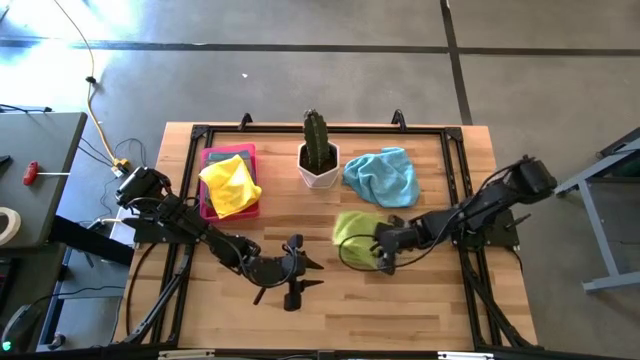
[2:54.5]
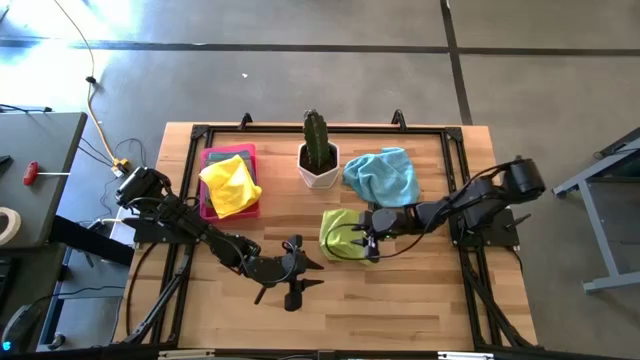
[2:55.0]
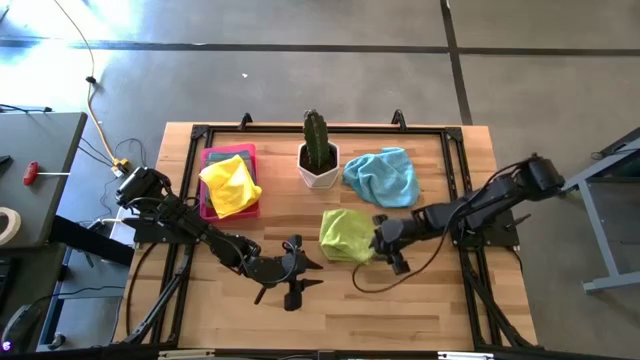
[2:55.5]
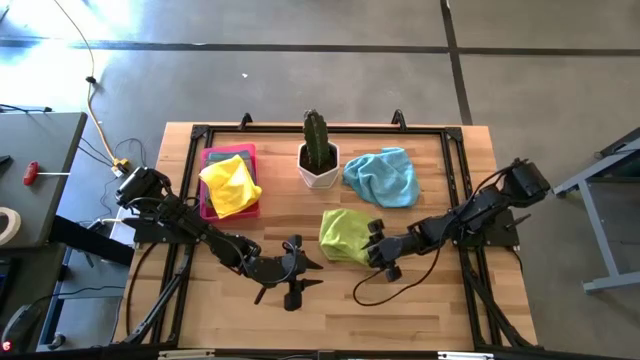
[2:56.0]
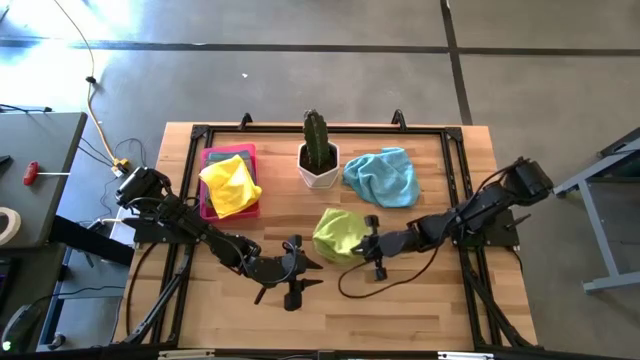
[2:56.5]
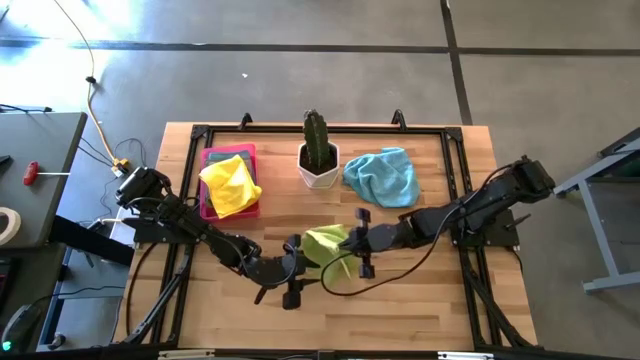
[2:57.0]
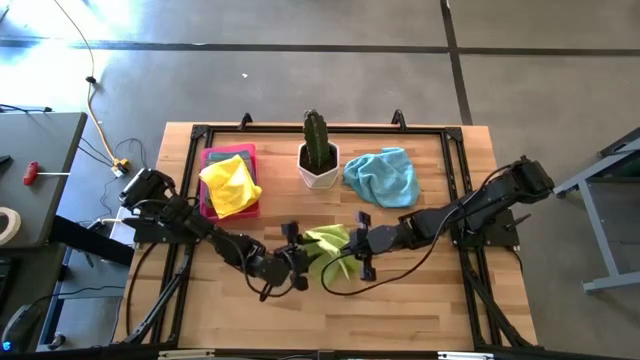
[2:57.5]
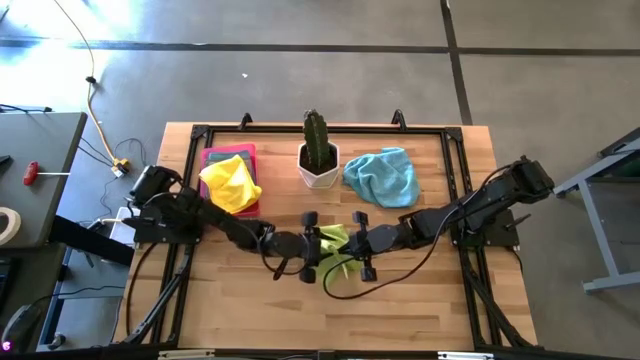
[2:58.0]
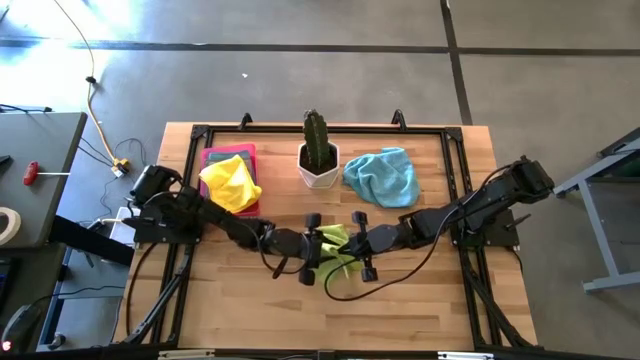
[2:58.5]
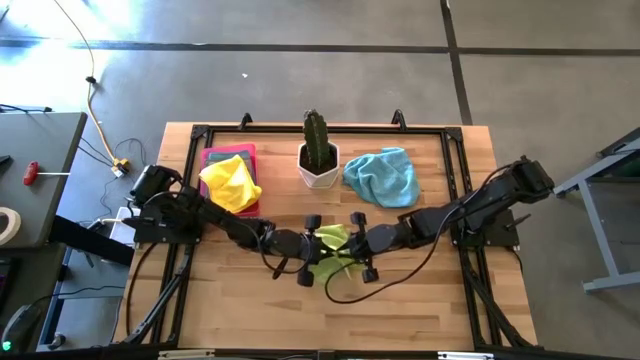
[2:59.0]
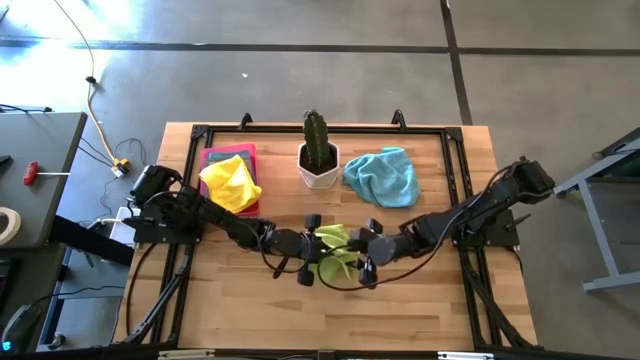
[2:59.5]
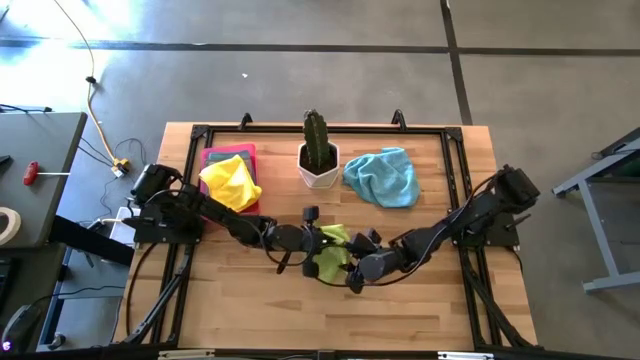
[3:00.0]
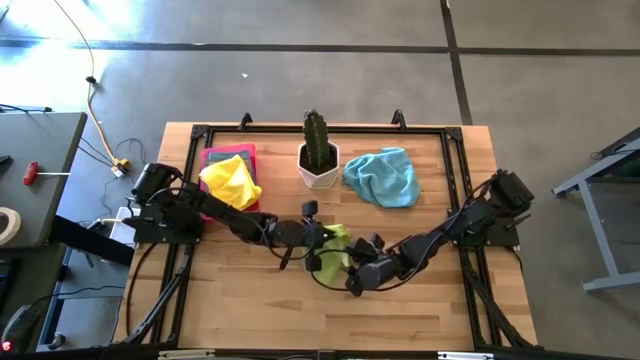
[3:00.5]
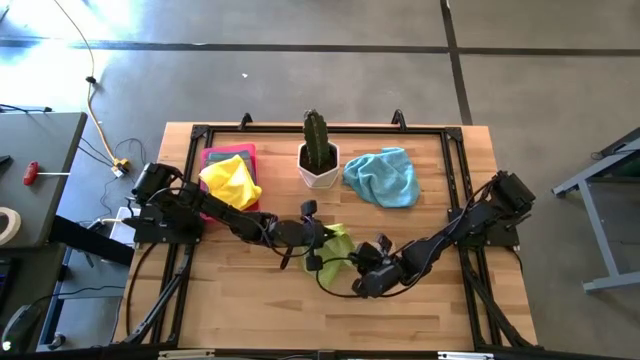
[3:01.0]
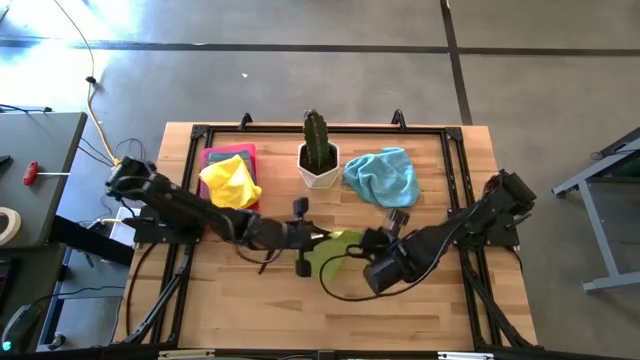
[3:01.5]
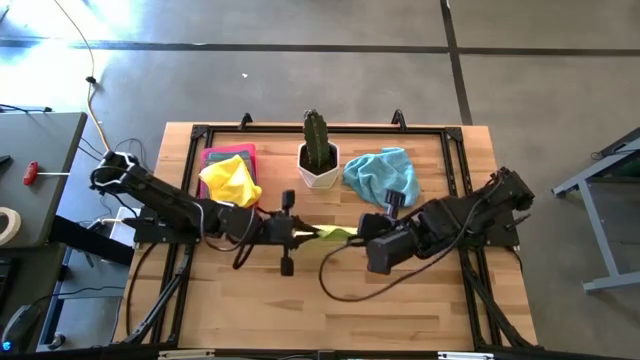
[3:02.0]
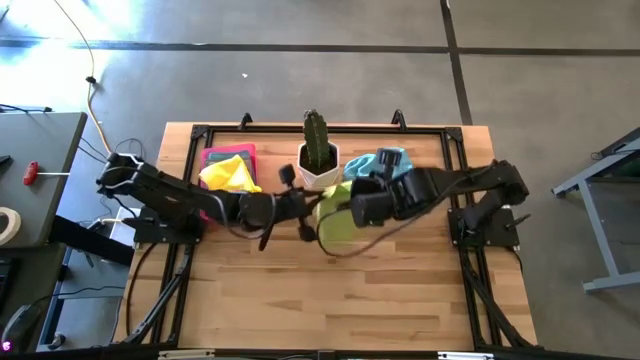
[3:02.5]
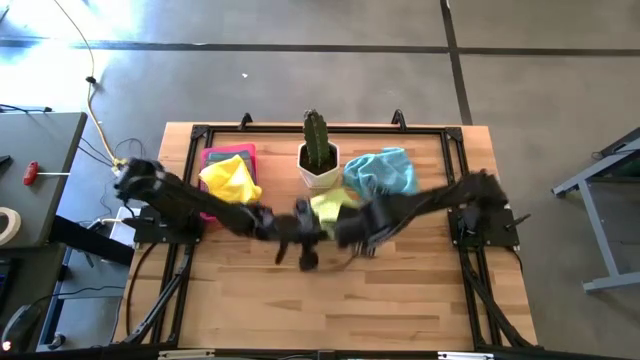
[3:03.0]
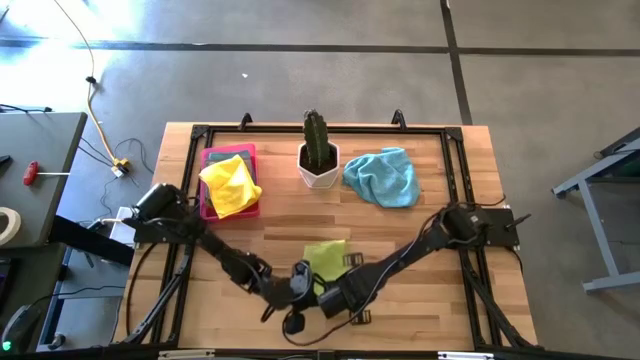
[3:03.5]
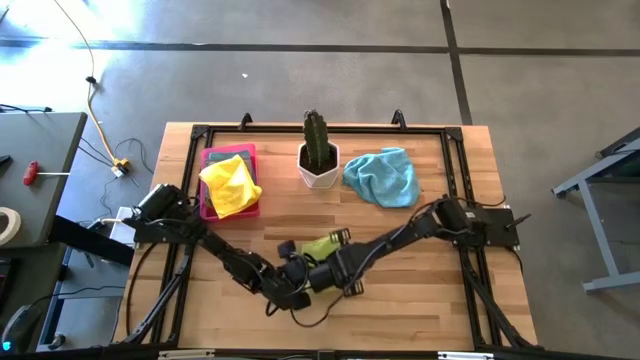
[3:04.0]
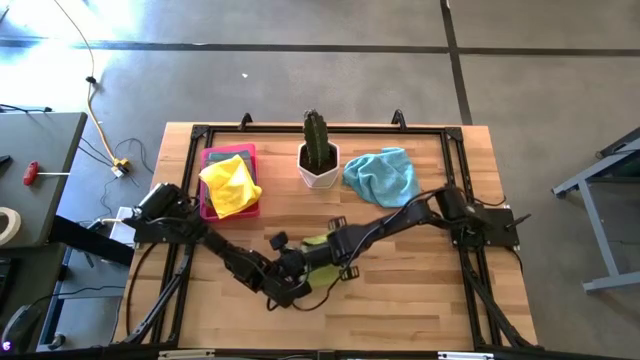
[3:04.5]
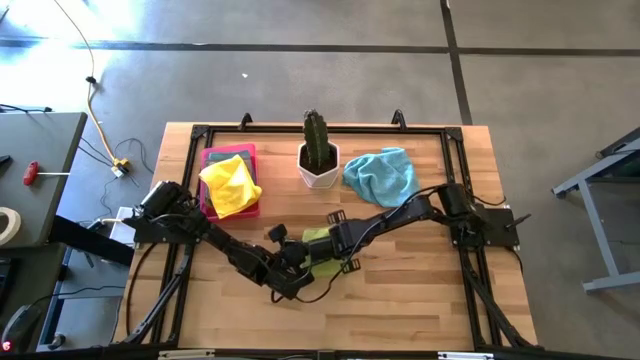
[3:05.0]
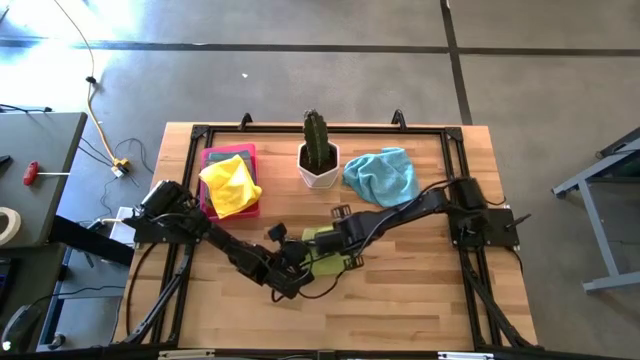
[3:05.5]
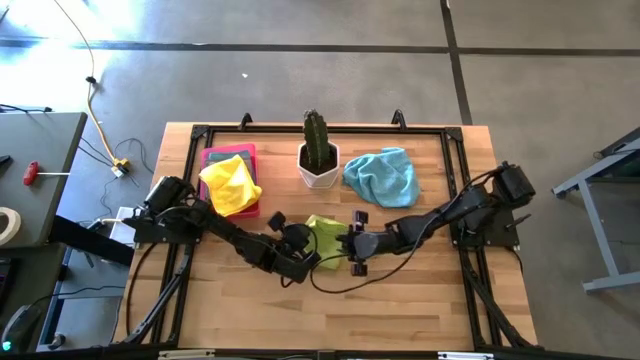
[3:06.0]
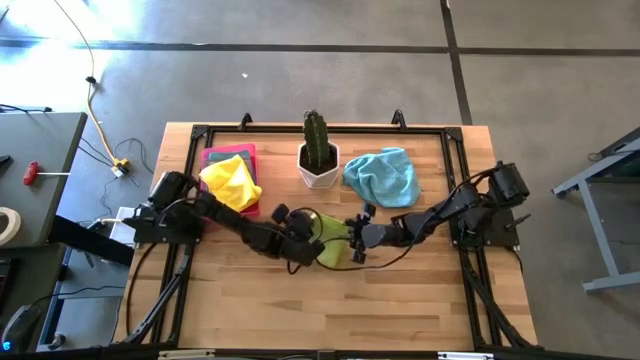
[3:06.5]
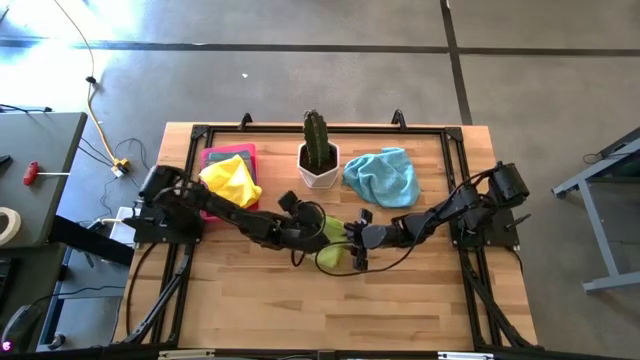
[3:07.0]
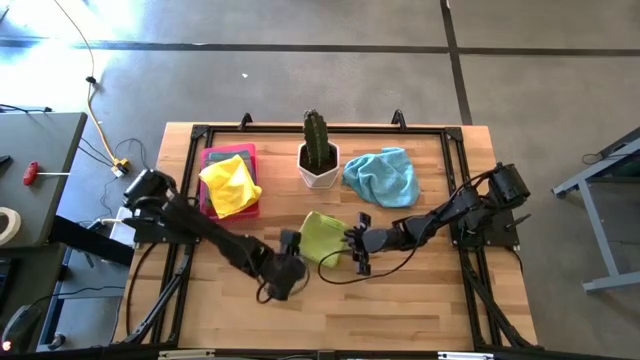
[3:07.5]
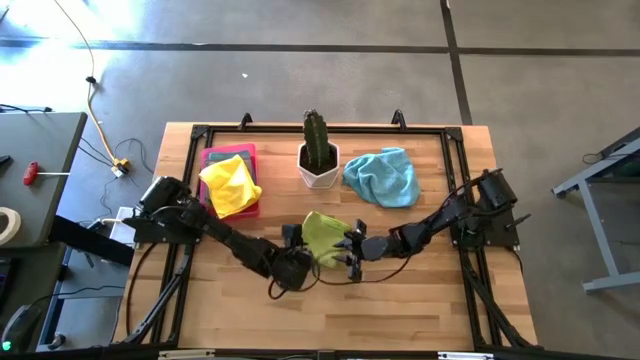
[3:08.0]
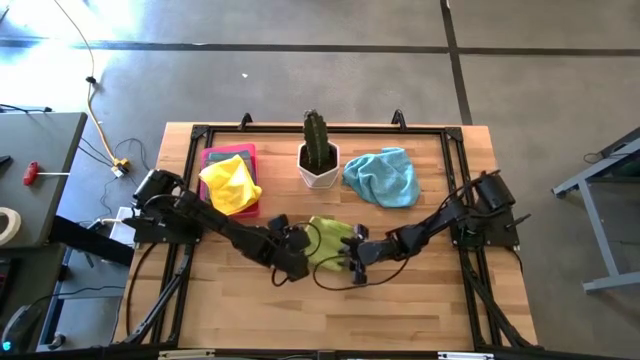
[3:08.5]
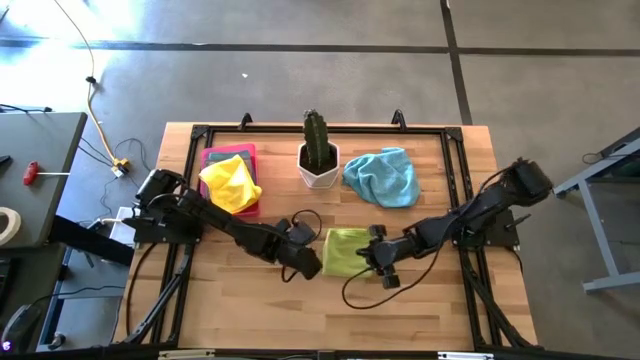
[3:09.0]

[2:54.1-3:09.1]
Task: Fold microfiber towels
Fold the light green towel

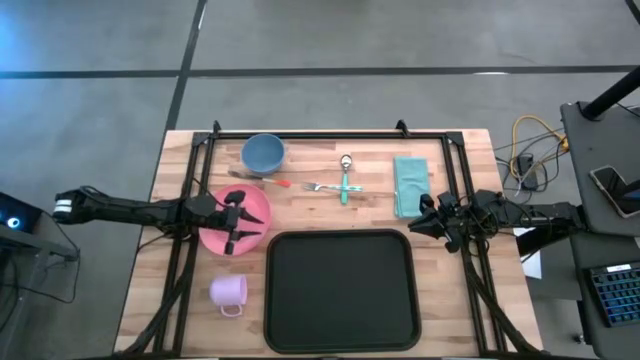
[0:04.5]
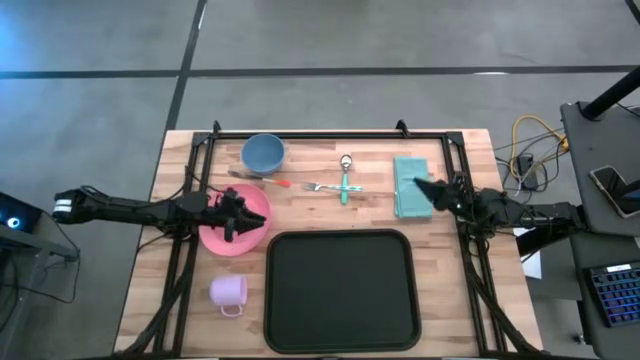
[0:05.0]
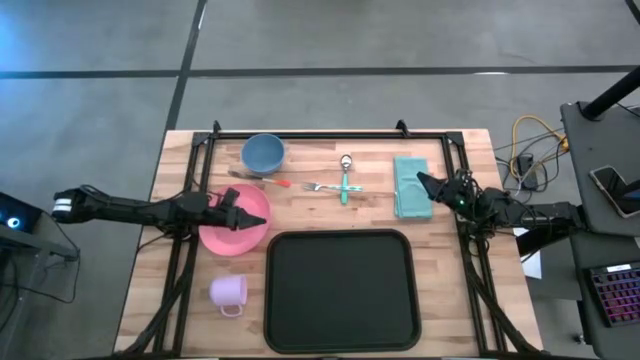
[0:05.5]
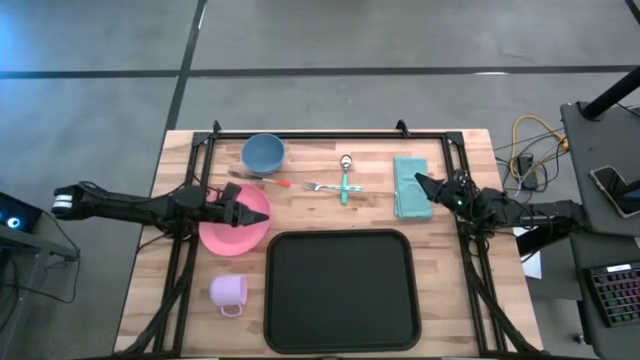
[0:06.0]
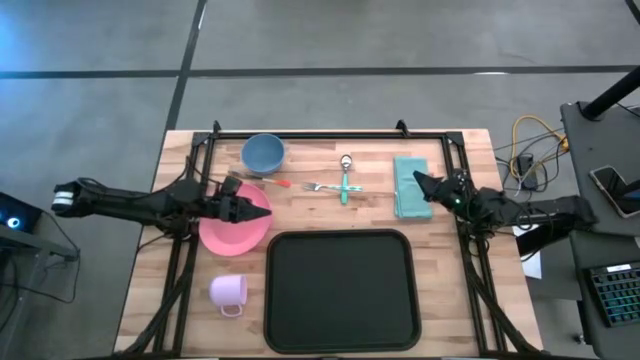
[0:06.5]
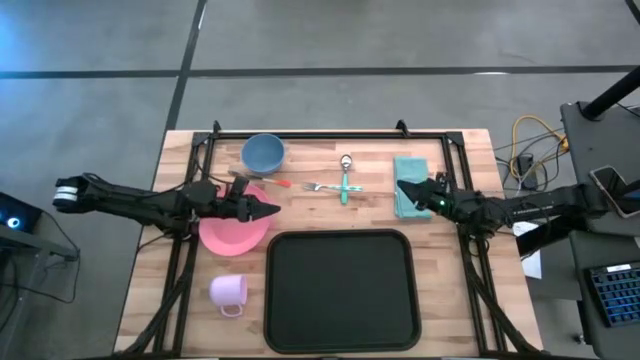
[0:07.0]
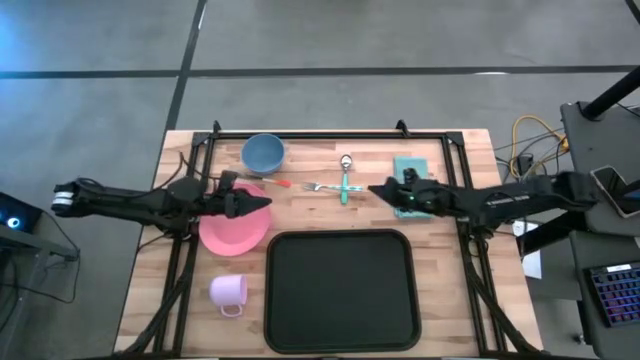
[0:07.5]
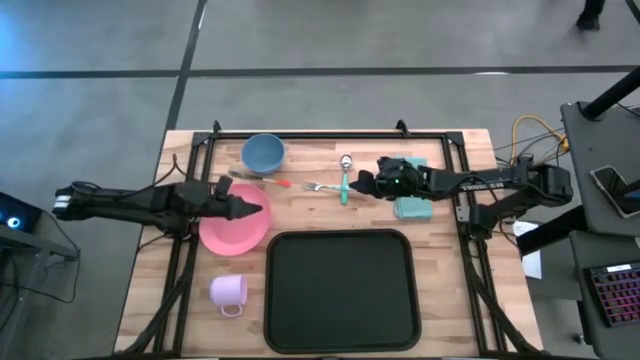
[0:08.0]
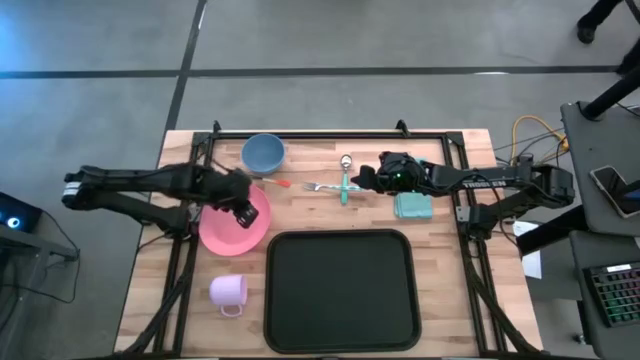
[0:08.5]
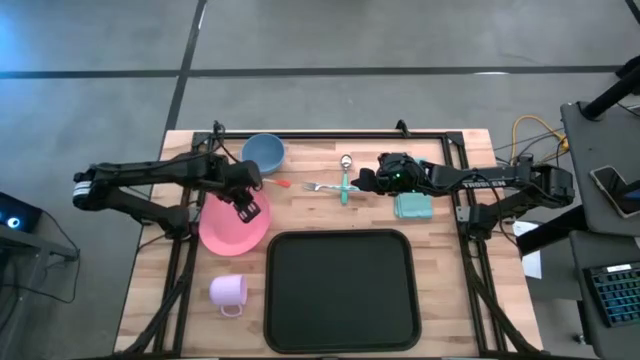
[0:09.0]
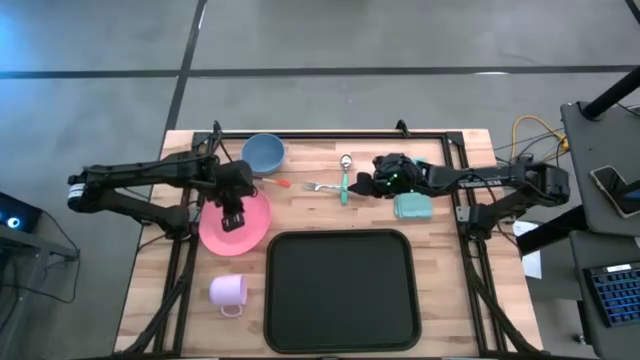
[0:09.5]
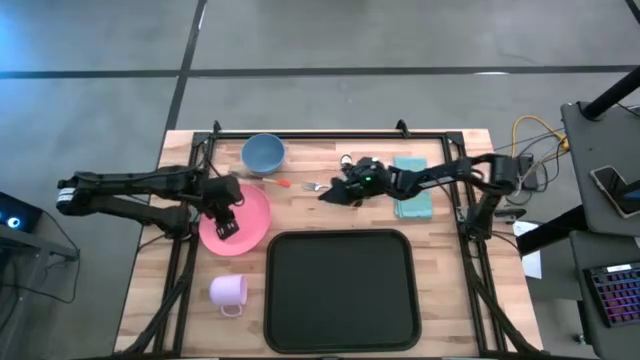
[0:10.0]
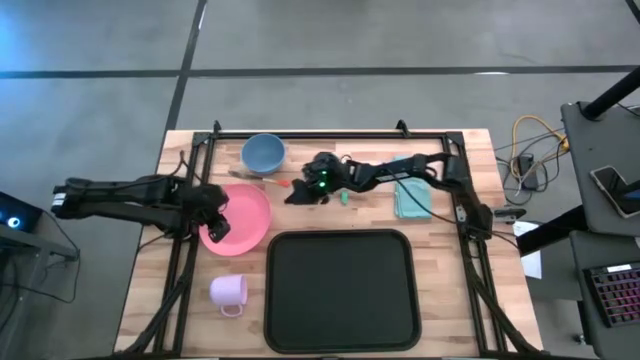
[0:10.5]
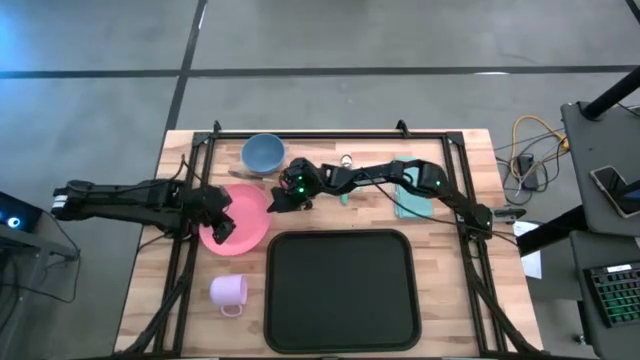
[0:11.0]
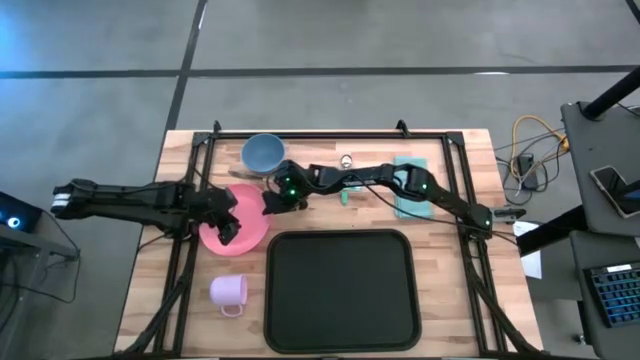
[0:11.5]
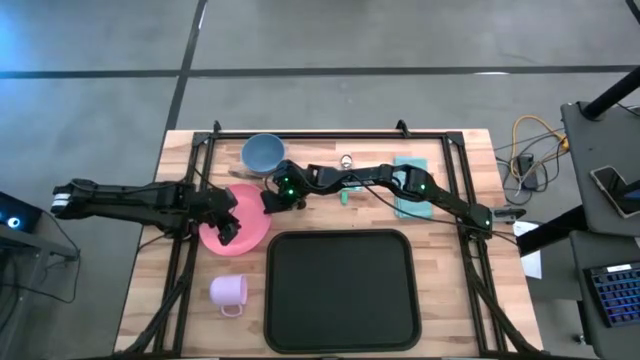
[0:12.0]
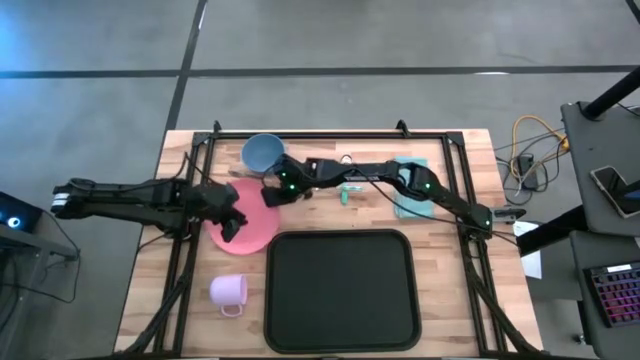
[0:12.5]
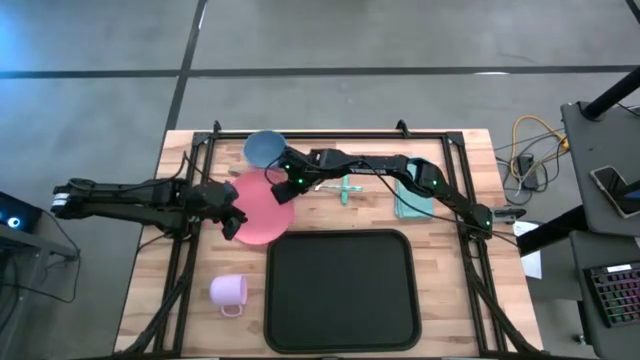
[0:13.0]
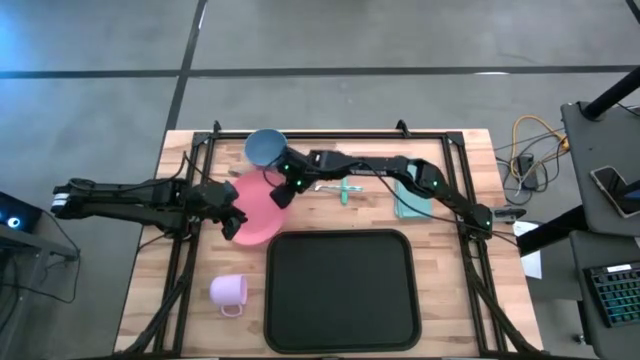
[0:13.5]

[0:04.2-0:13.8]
Task: Set up tray
Put the pink plate on the black tray
